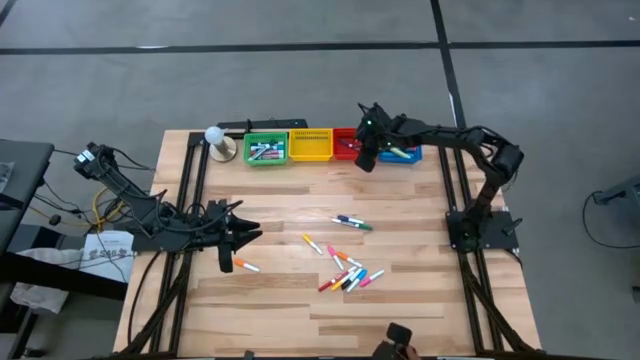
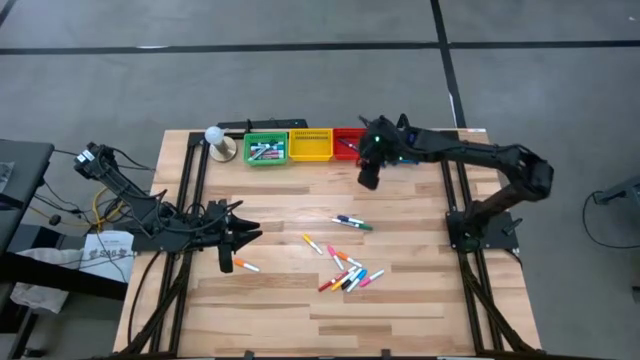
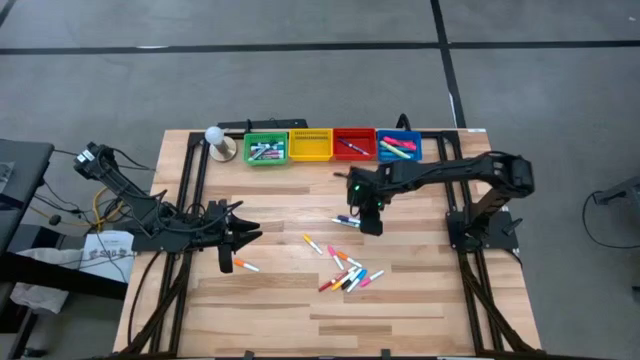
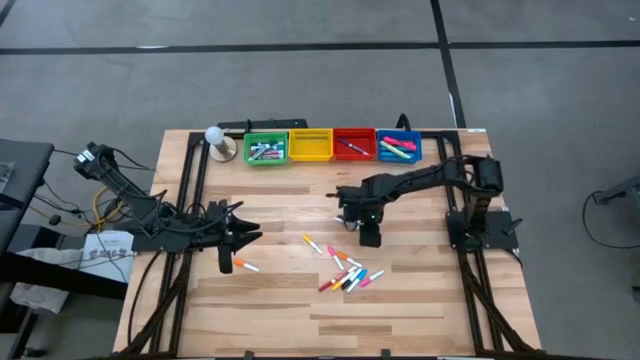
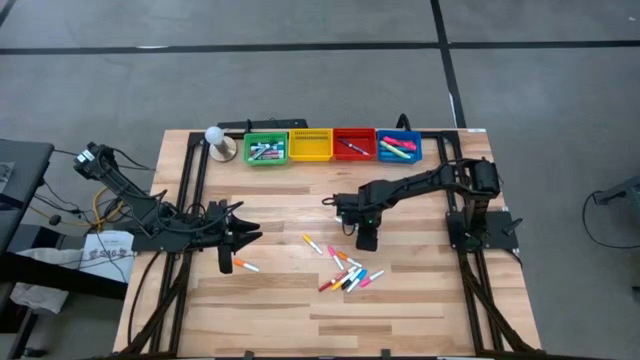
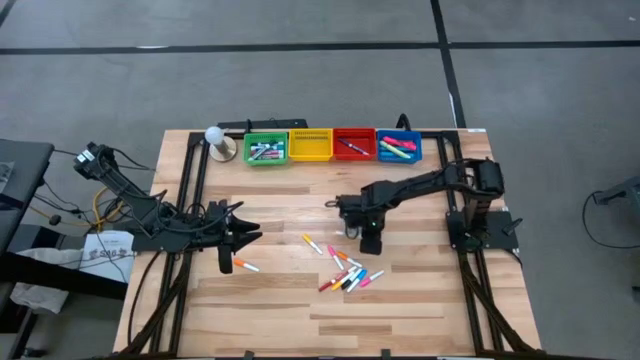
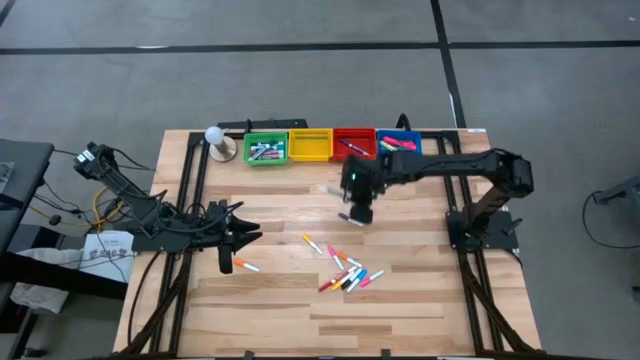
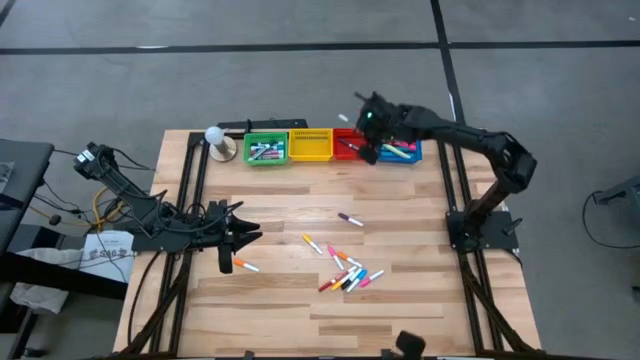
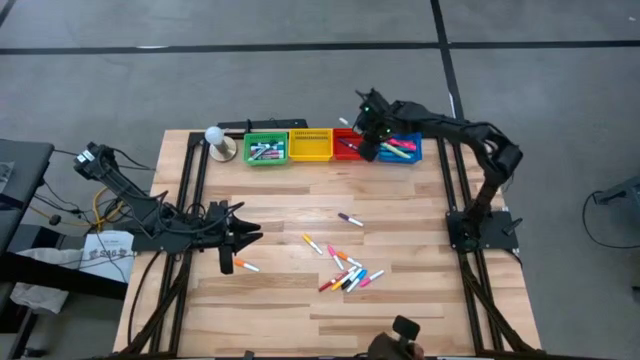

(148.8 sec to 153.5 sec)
Task: Pick & Place Markers
Put the green marker pen into the red basket

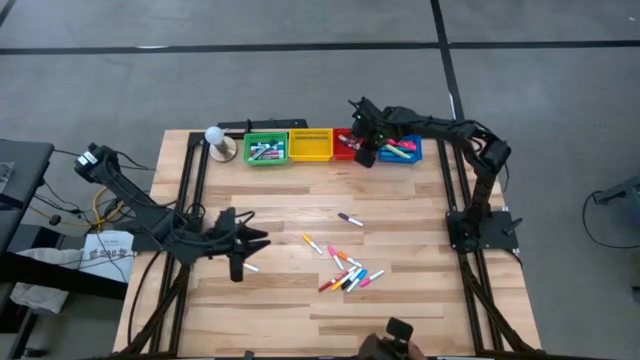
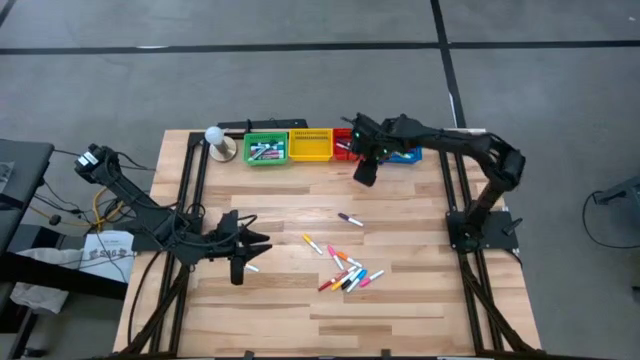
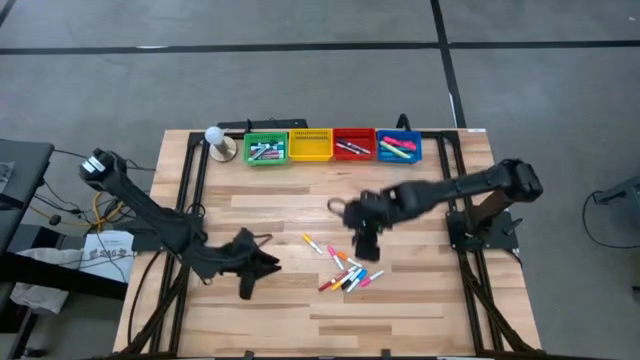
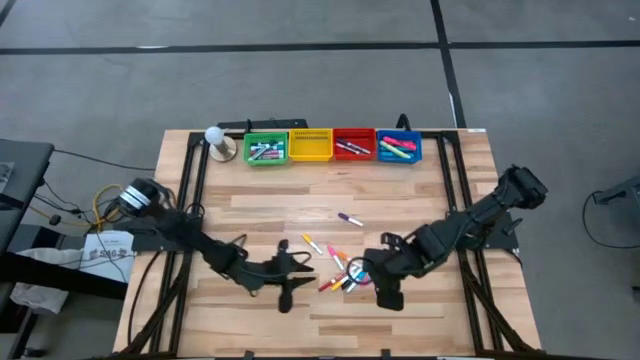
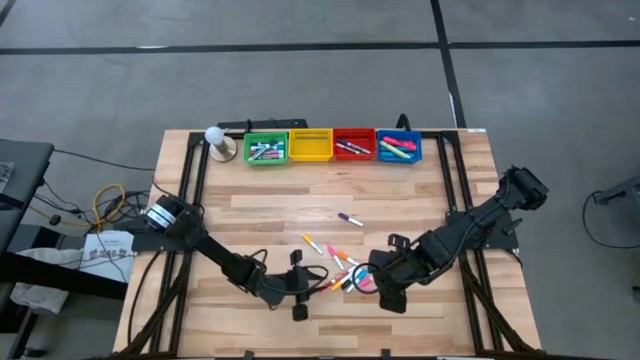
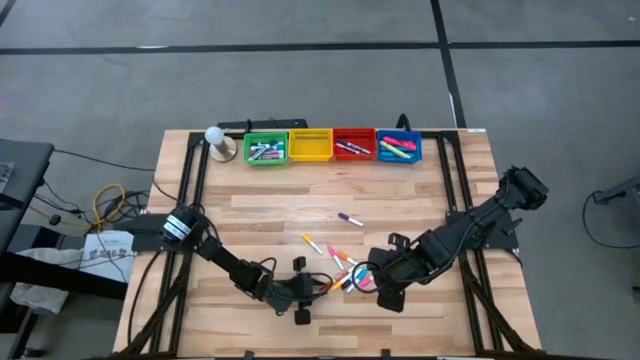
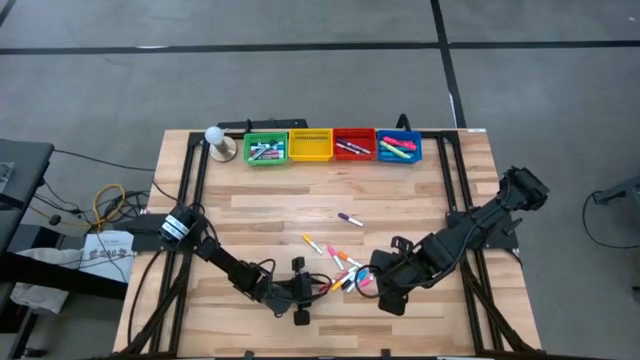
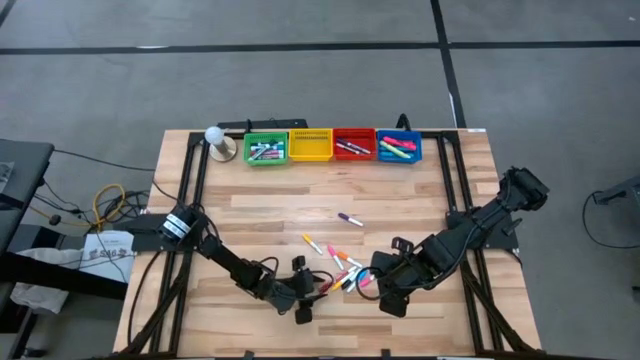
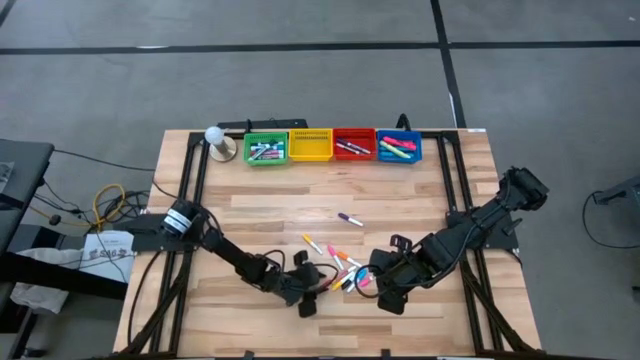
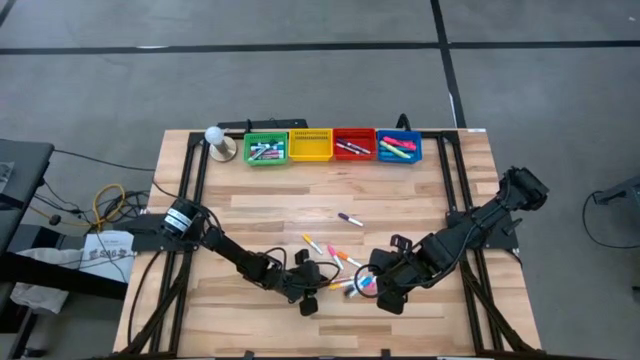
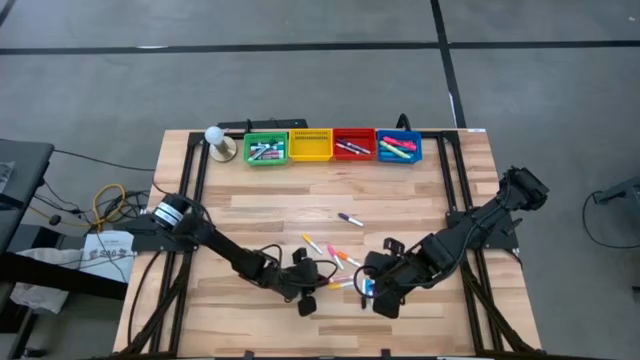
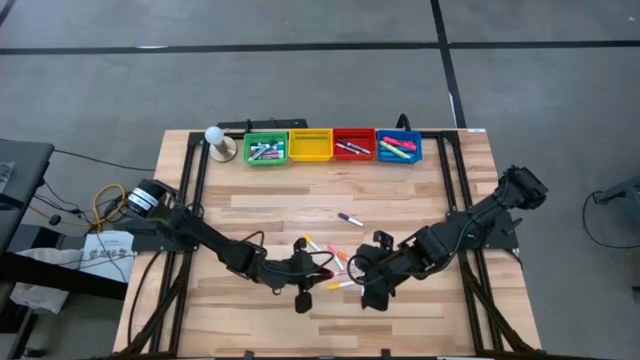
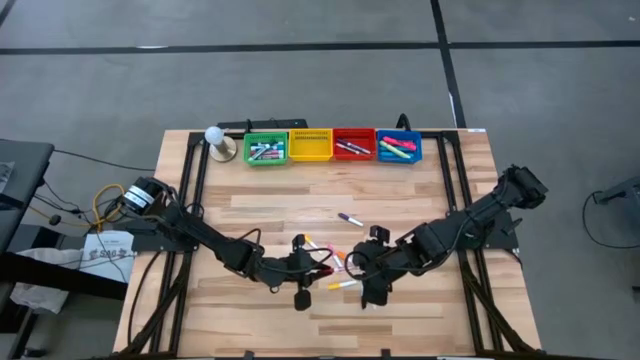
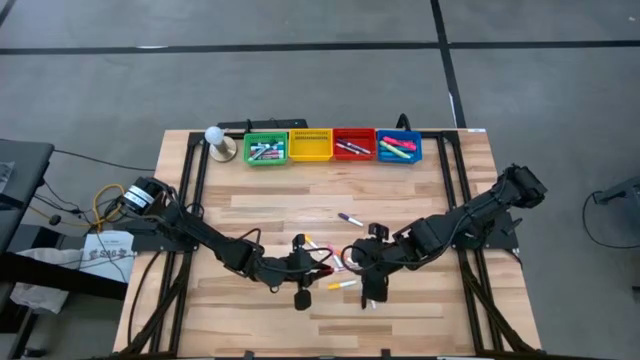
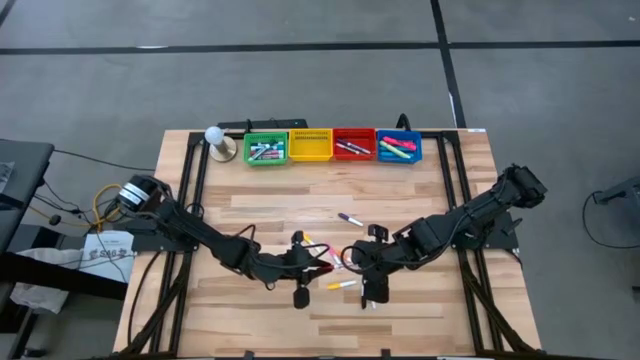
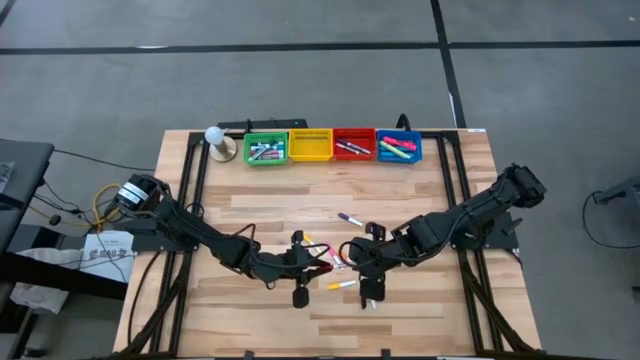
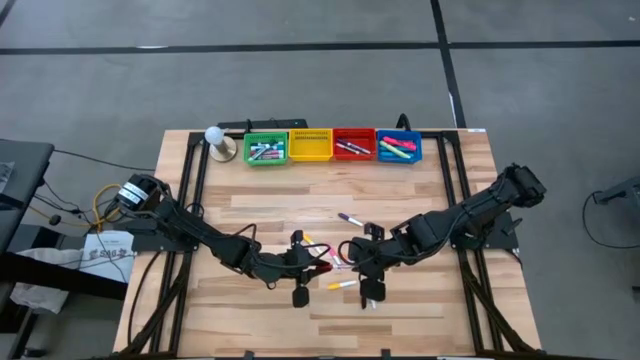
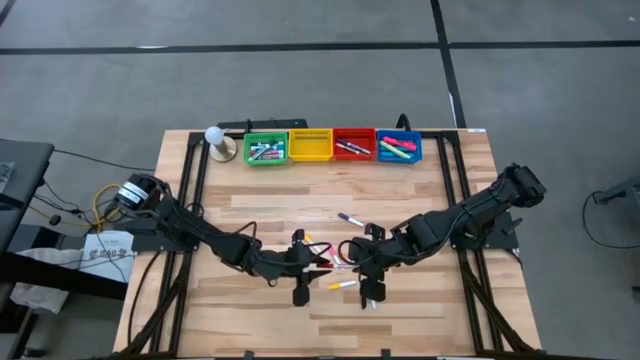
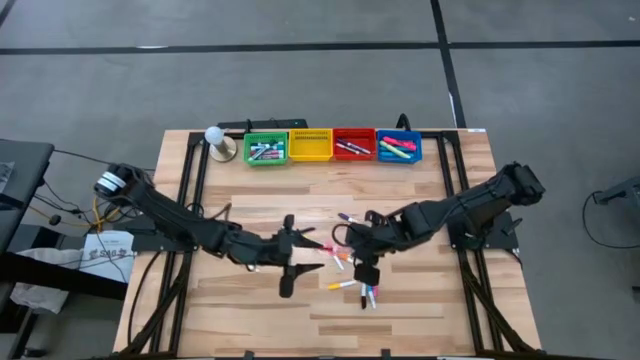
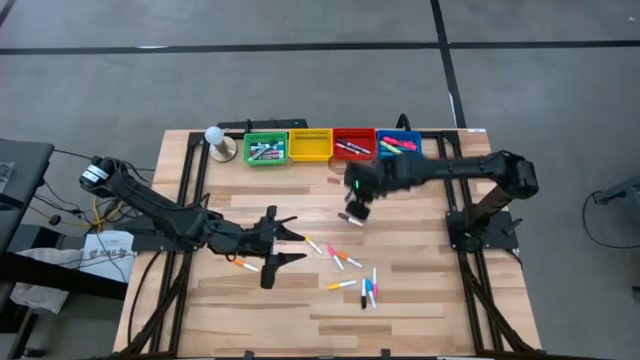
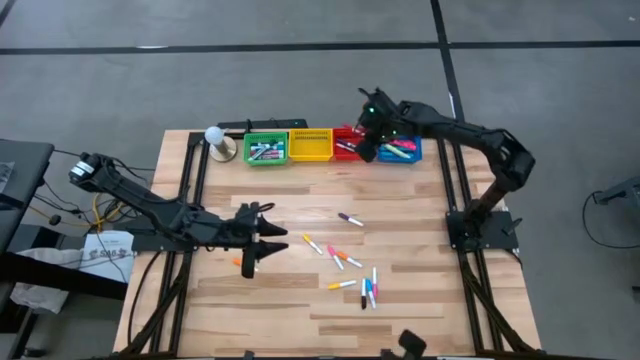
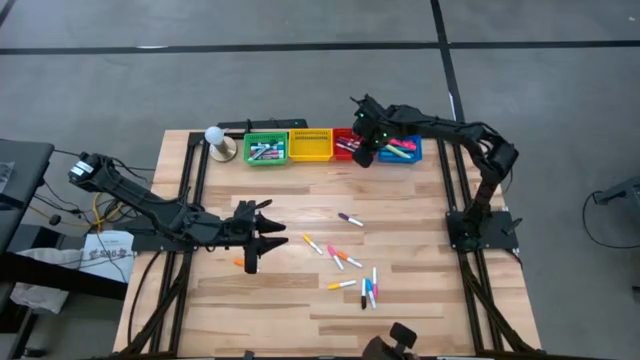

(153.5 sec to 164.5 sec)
Put the red marker pen into the red basket

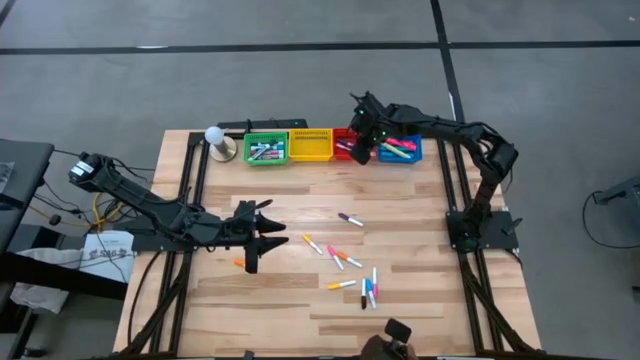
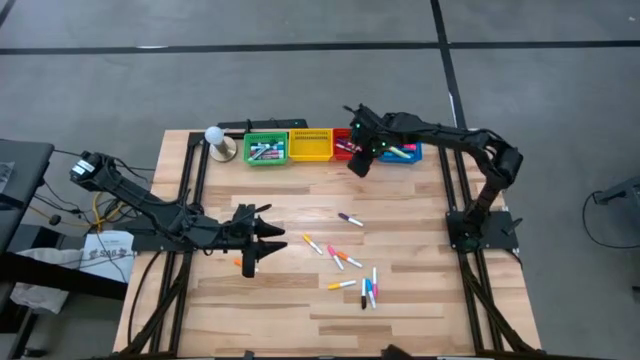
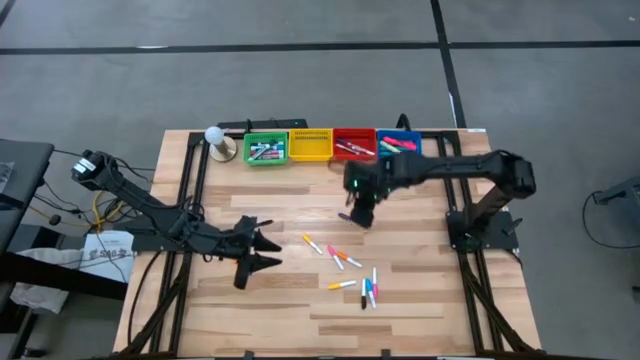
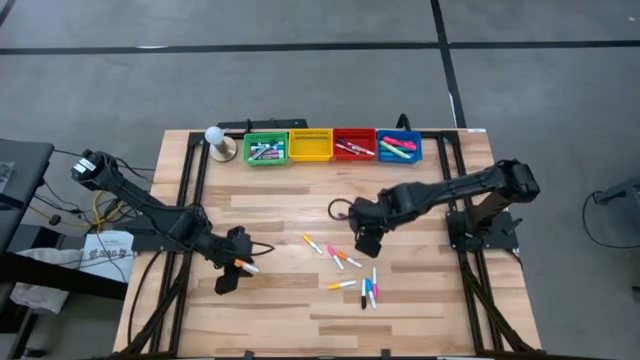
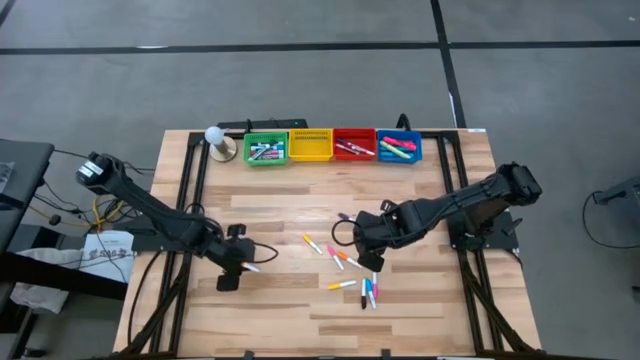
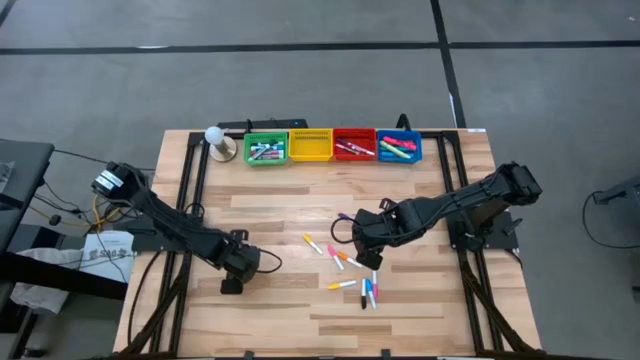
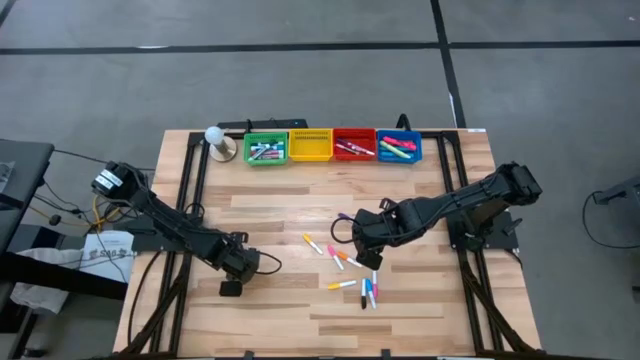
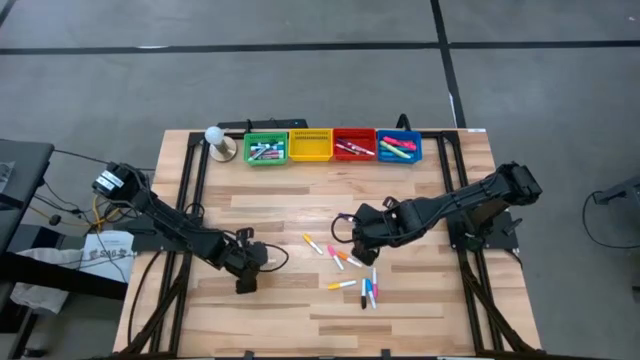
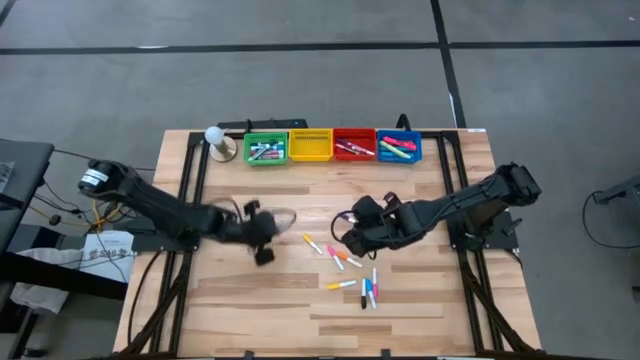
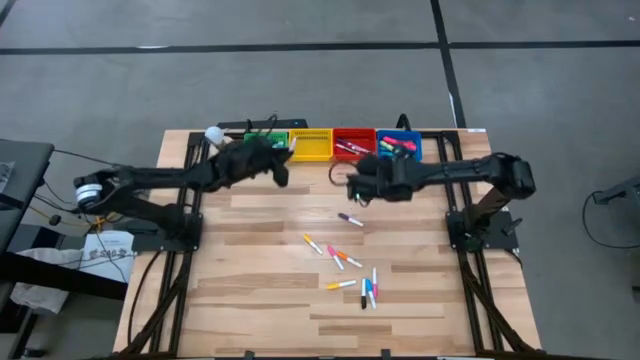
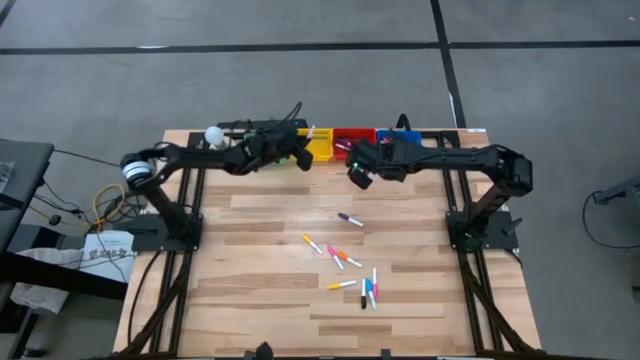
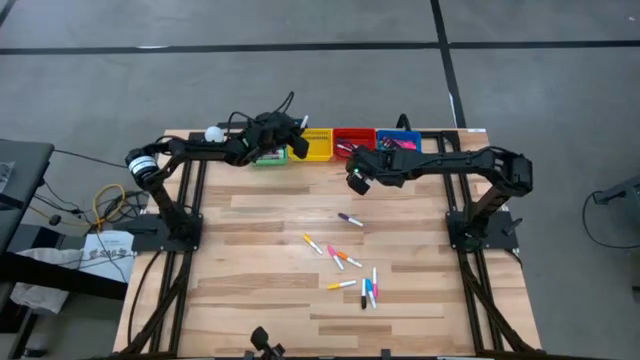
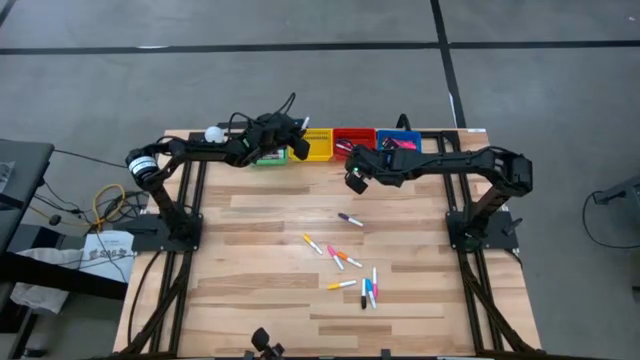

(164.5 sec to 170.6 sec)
Put the orange highlighter pen into the yellow basket
